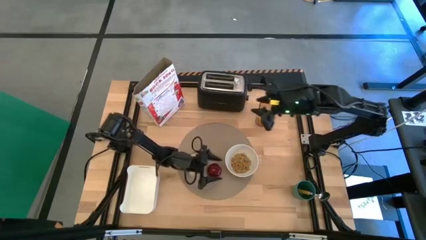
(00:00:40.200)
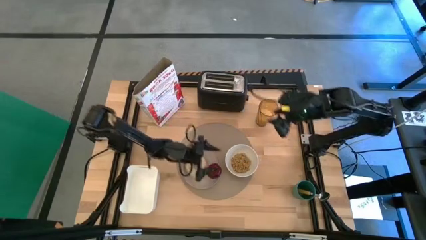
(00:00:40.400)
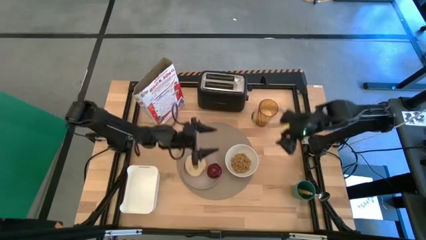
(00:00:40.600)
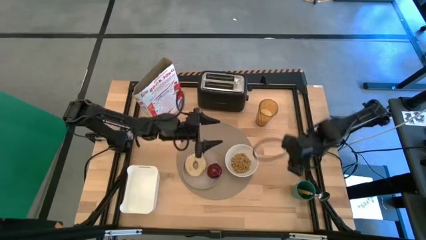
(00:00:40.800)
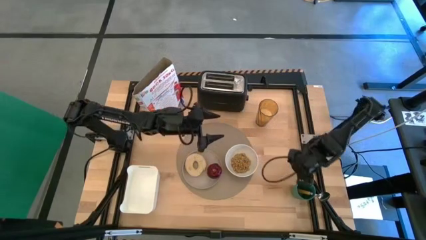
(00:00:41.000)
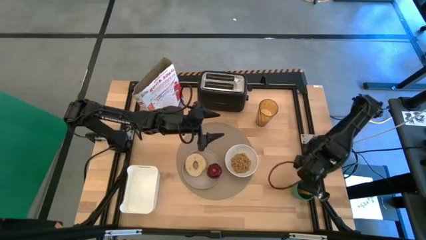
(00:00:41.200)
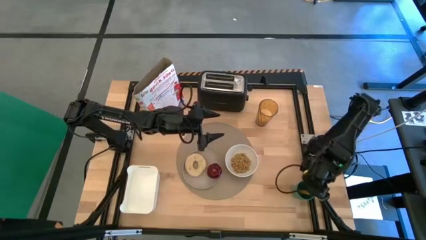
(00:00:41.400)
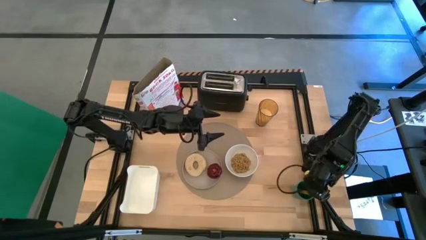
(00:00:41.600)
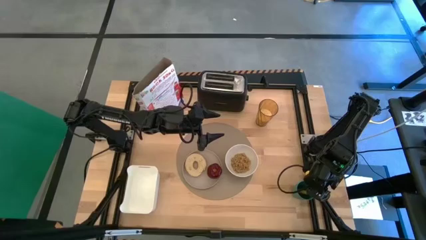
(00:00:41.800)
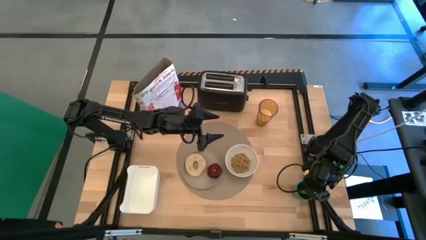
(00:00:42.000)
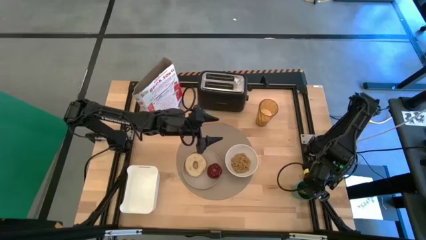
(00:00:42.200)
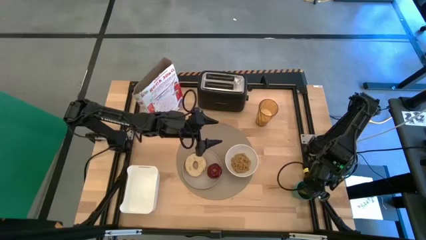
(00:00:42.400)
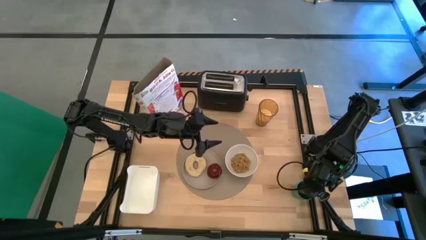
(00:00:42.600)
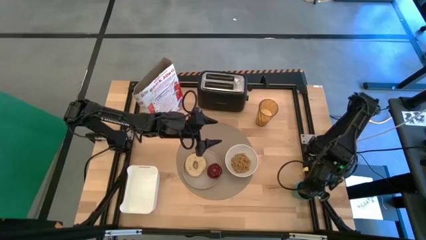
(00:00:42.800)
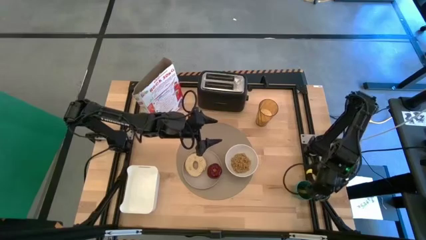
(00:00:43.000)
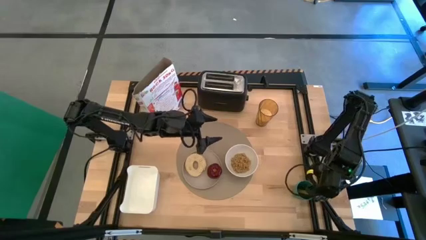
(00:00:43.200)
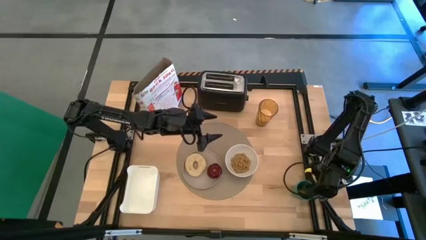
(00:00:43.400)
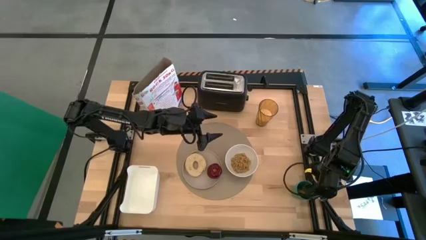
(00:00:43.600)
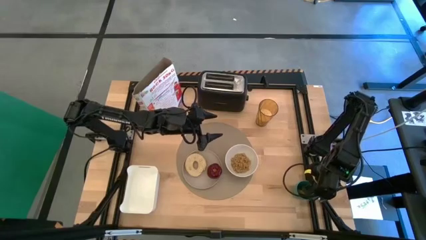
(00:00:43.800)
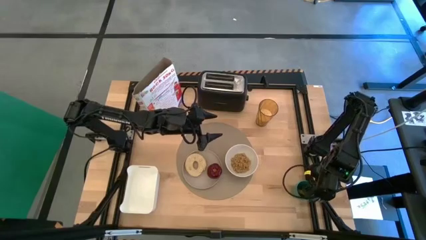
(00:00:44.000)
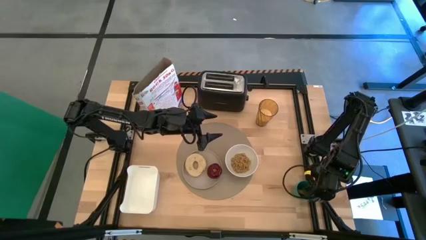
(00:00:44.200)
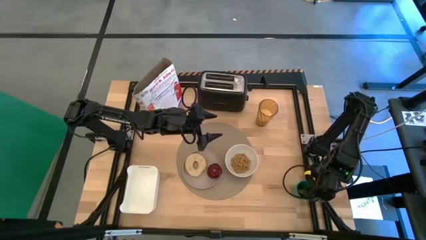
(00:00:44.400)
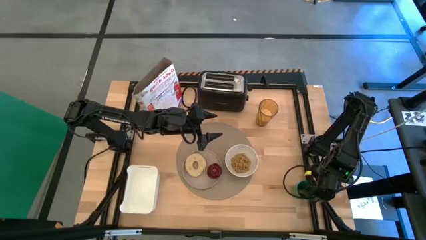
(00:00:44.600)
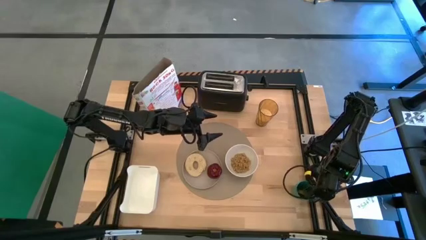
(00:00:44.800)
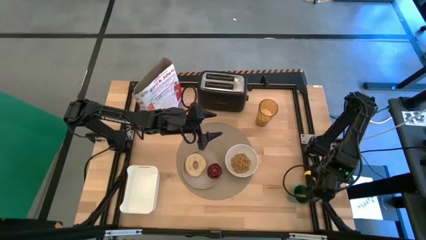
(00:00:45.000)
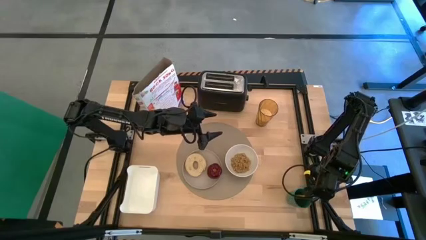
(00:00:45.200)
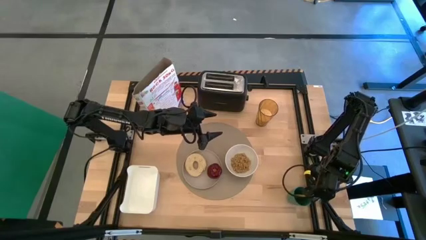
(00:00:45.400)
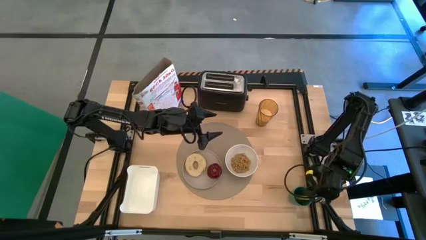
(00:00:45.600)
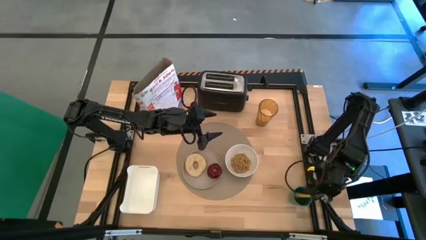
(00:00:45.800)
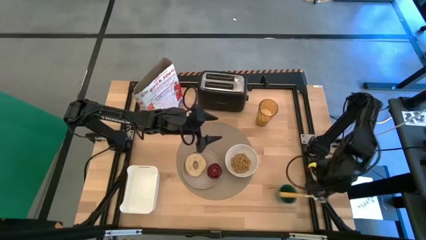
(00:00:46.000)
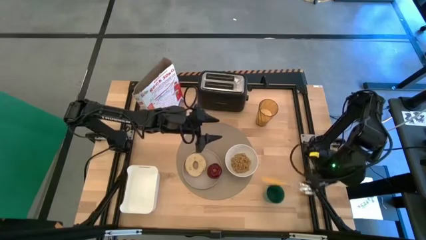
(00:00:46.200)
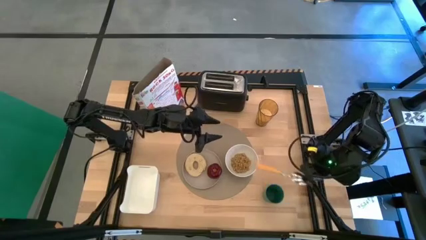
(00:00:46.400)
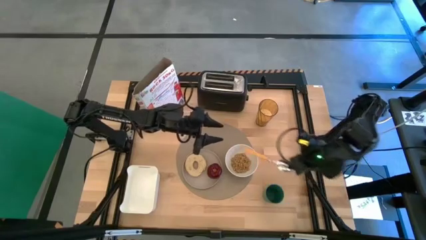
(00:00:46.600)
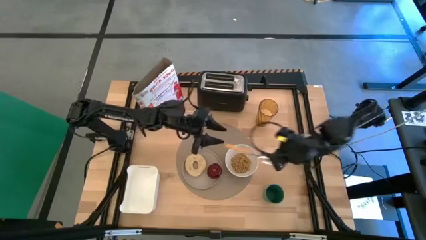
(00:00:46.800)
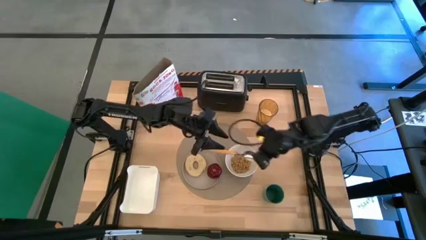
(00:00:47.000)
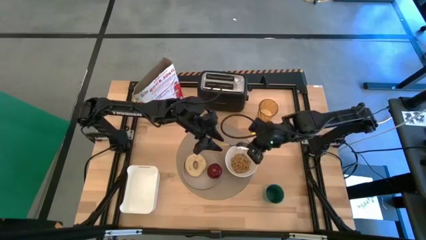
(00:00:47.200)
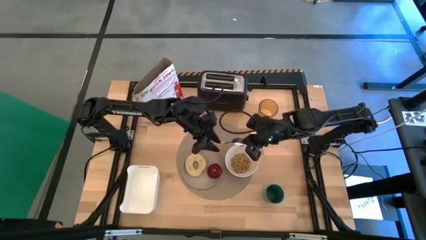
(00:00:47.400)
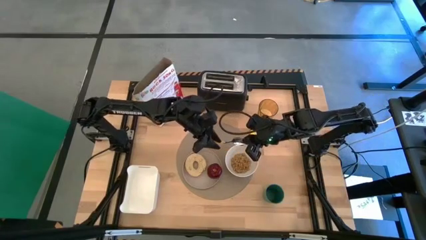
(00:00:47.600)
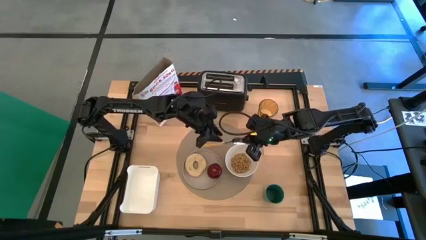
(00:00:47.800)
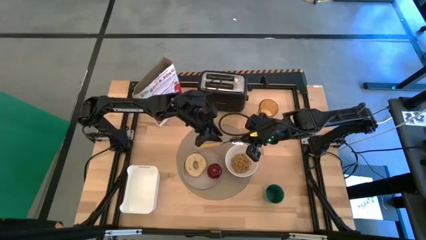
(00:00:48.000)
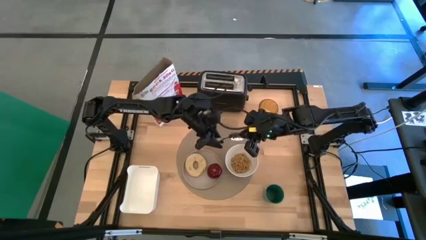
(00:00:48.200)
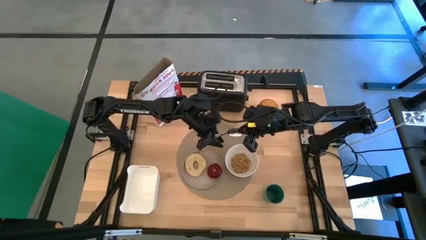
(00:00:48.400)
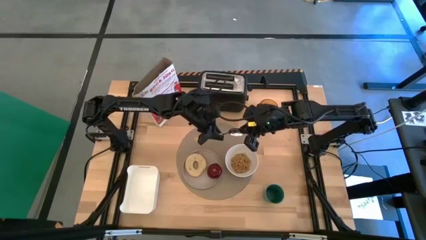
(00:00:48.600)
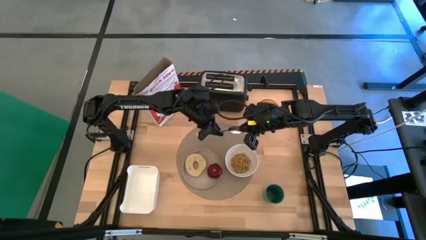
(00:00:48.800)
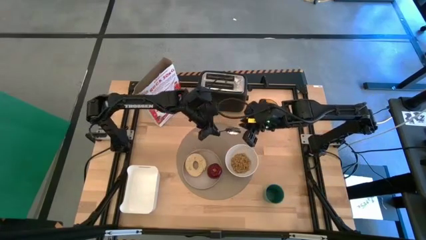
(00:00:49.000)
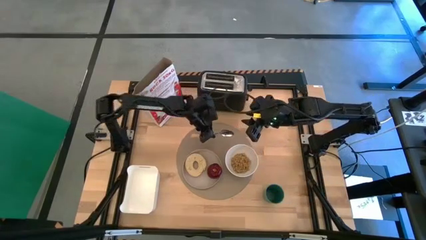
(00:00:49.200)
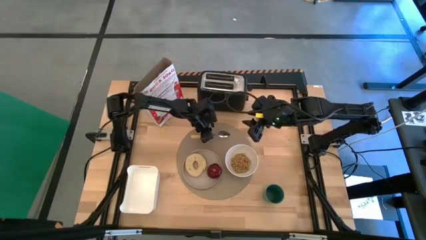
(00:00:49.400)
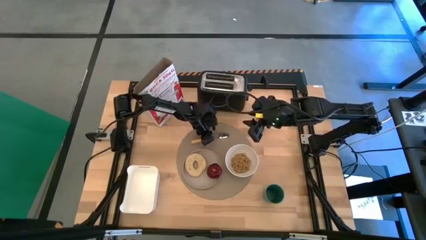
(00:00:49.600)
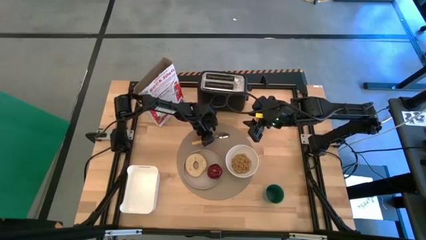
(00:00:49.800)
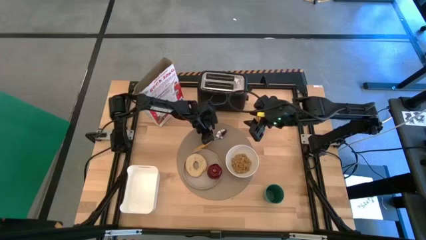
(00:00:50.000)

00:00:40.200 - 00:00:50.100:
Task: Arrange a breakfast setting
Put the yellow spoon on the top of the gray placemat
